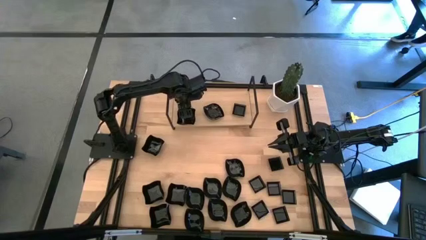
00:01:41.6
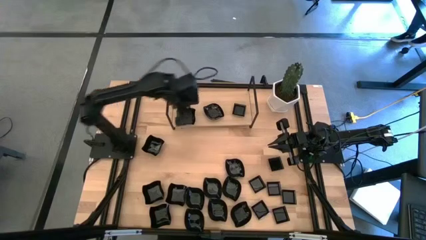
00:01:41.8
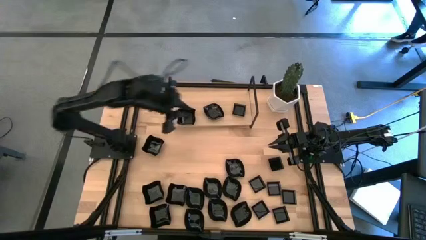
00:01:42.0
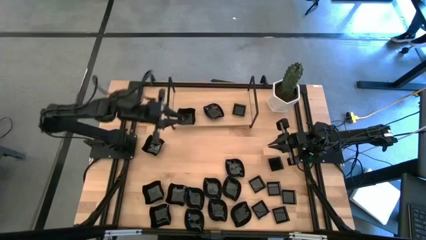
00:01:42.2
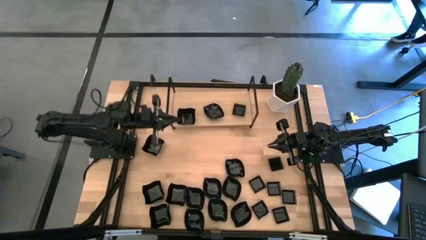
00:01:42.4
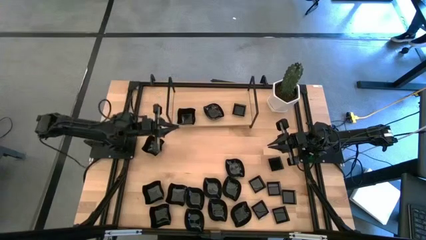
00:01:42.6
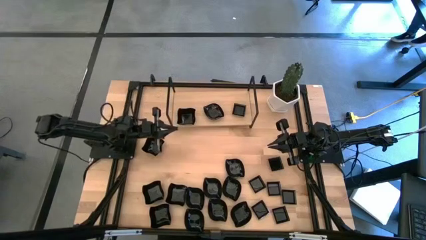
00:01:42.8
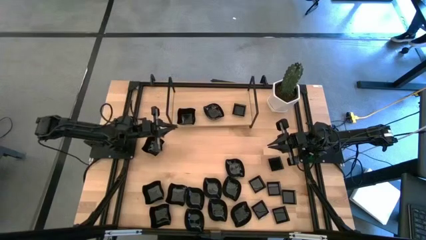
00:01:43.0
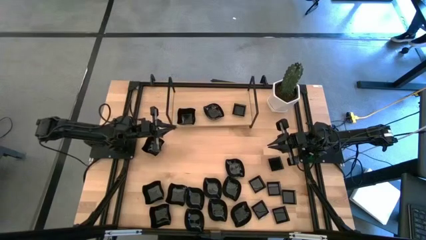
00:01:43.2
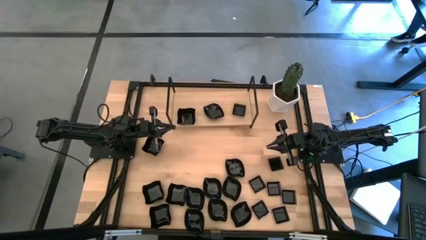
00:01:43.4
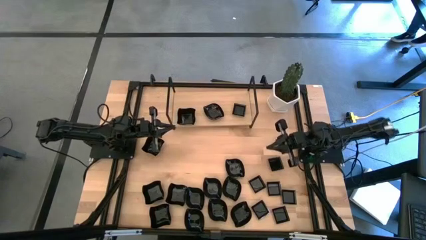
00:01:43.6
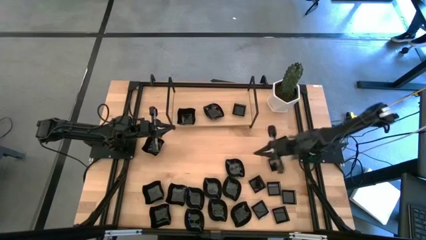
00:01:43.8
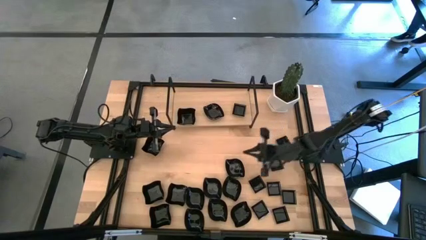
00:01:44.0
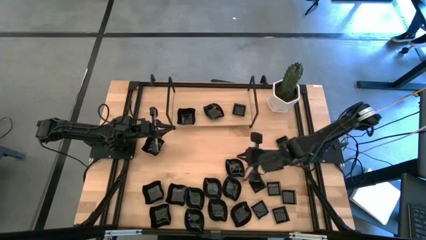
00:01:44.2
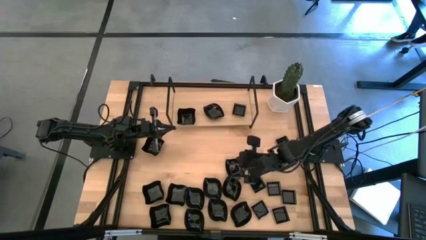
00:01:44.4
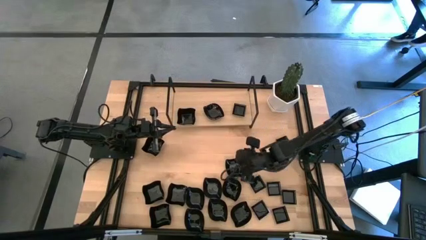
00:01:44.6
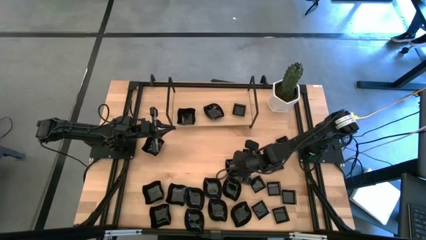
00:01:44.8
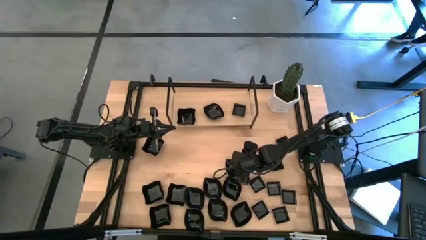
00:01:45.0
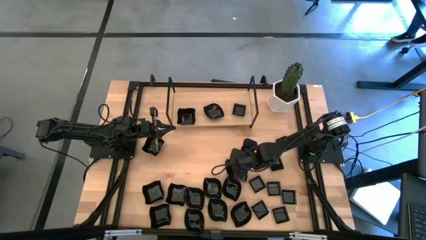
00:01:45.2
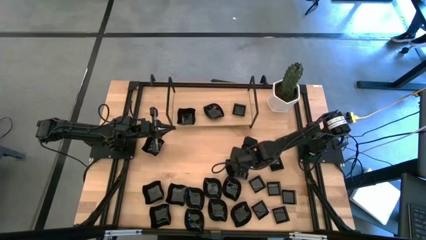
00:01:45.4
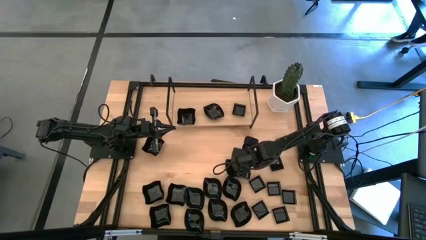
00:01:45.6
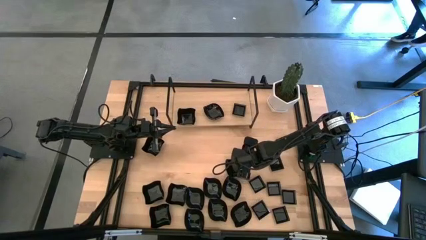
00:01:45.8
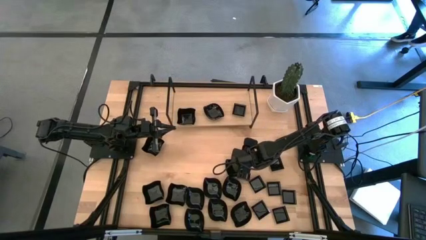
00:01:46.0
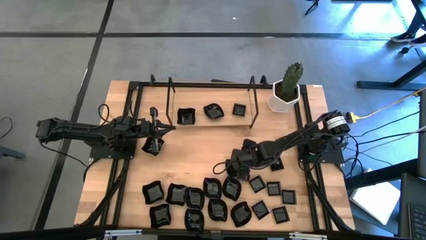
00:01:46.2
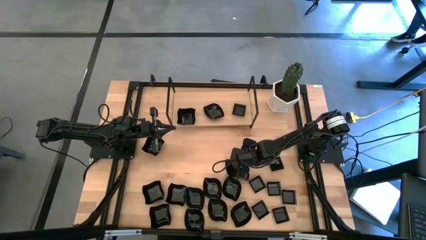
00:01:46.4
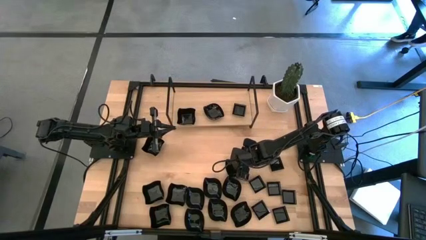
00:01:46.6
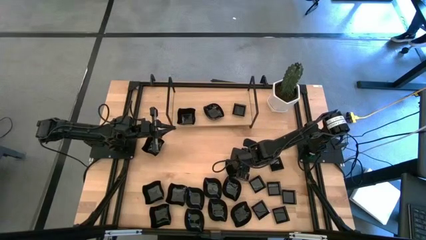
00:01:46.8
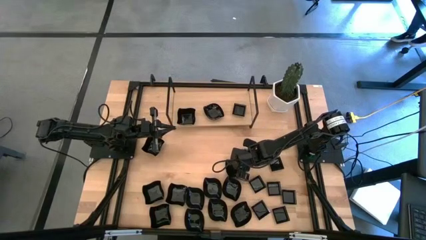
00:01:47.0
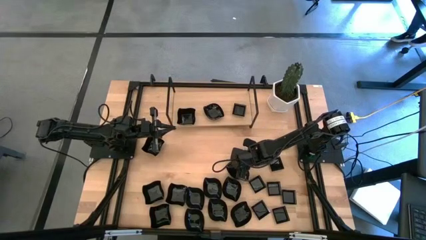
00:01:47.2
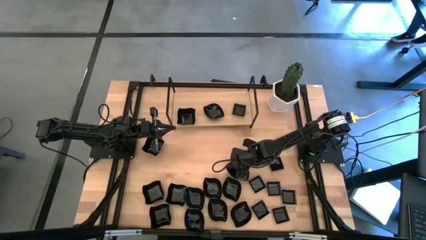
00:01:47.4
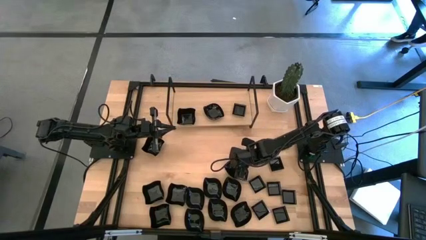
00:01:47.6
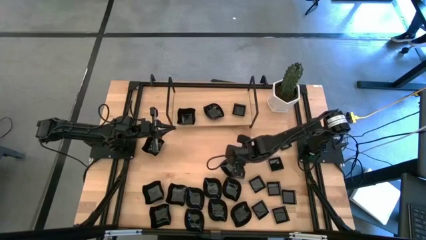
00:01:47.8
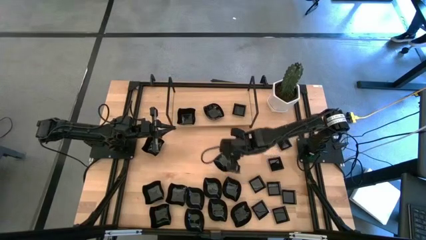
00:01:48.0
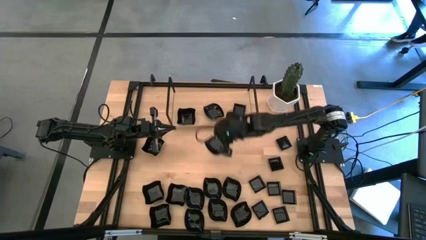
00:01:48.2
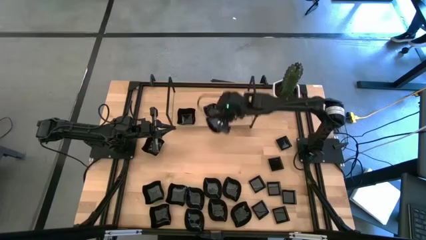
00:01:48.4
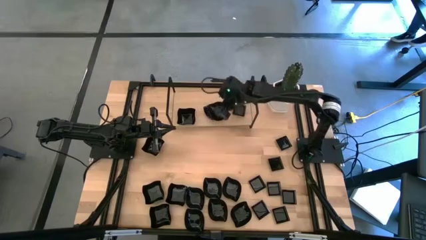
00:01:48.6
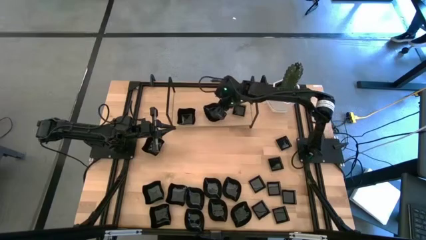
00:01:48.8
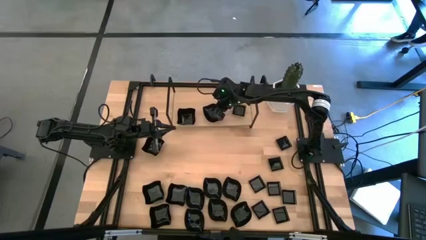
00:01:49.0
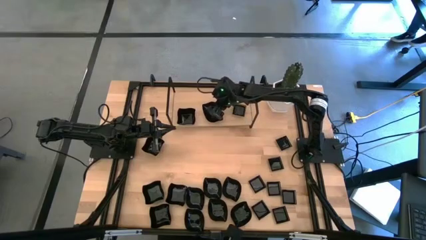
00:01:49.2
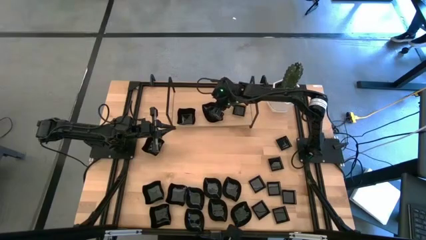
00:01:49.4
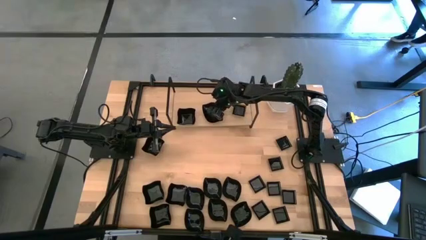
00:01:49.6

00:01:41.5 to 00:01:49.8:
Task: Pick & Place Mini shaped plates
Stack the black leaf-shaped plate on top of the black leaf-shaped plate on the shelf

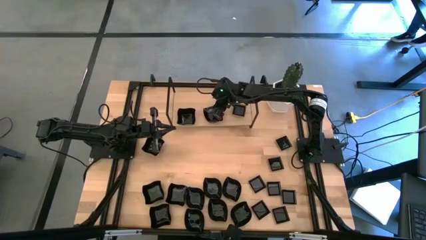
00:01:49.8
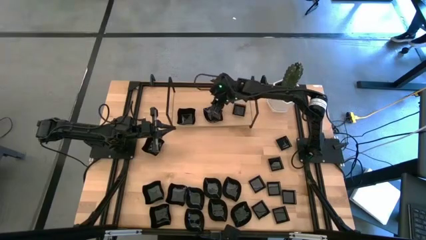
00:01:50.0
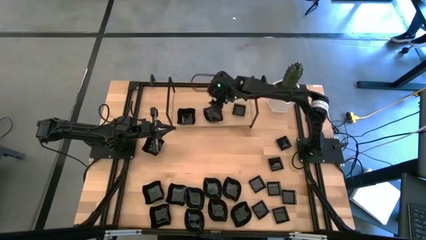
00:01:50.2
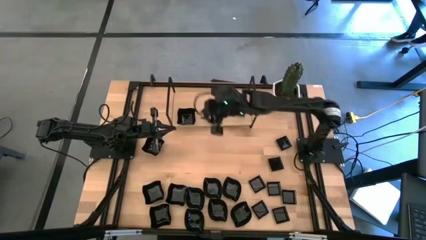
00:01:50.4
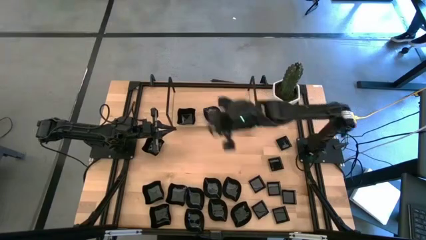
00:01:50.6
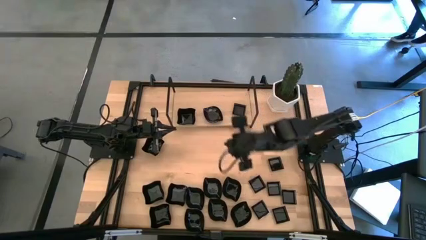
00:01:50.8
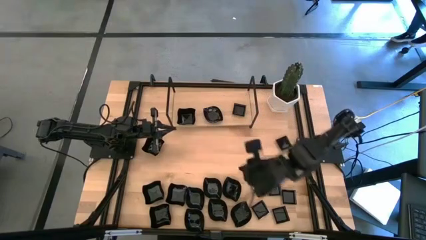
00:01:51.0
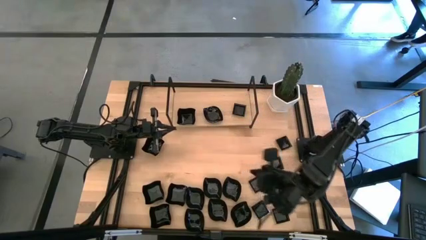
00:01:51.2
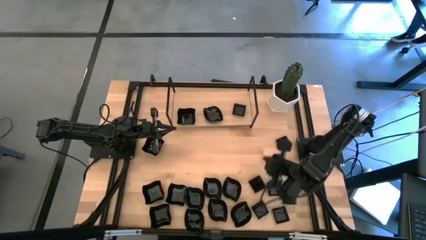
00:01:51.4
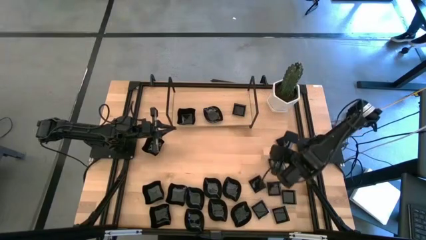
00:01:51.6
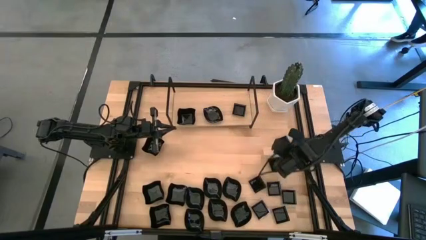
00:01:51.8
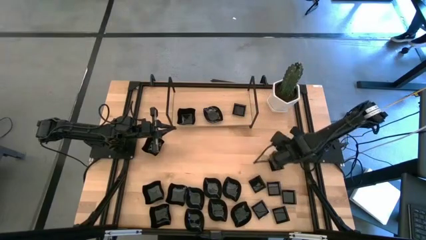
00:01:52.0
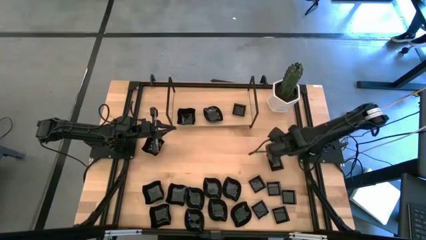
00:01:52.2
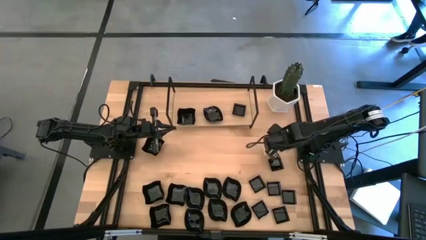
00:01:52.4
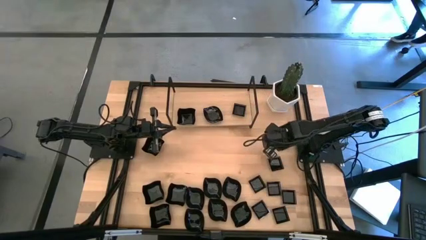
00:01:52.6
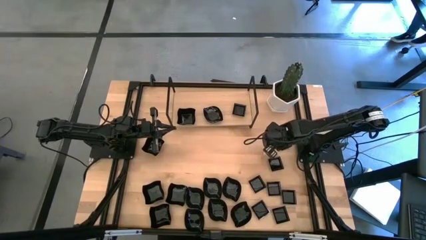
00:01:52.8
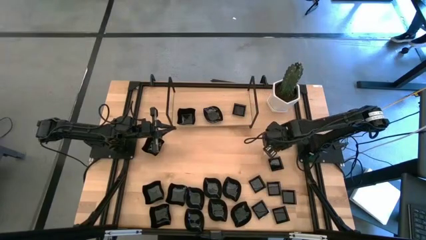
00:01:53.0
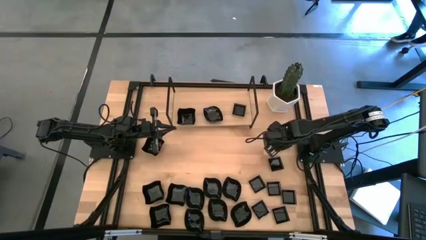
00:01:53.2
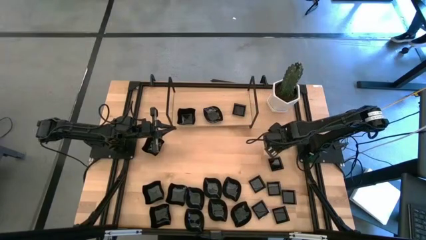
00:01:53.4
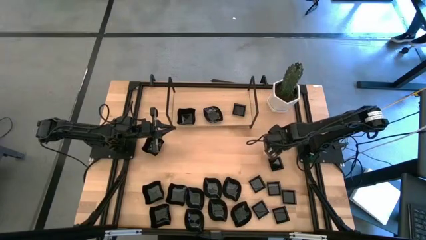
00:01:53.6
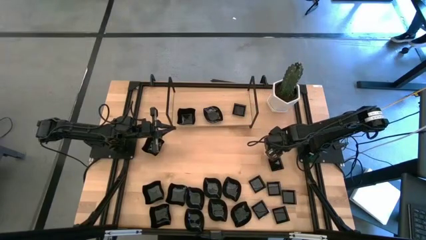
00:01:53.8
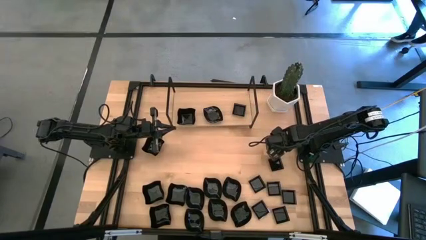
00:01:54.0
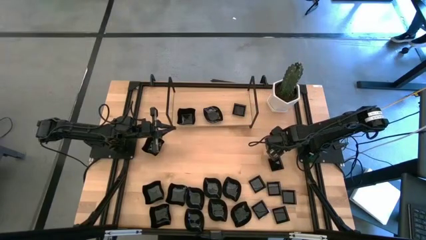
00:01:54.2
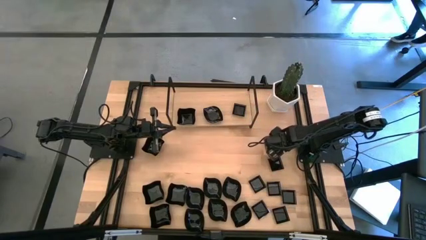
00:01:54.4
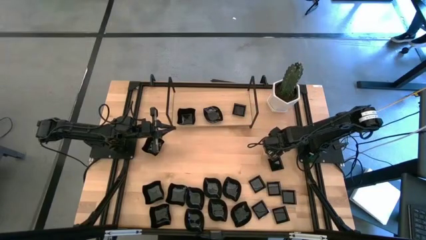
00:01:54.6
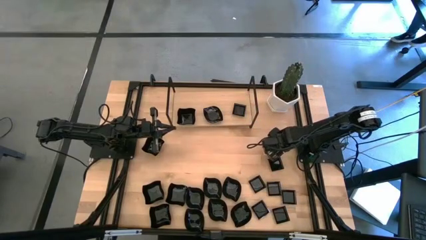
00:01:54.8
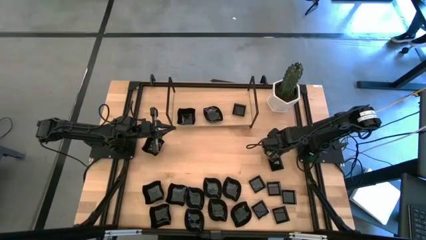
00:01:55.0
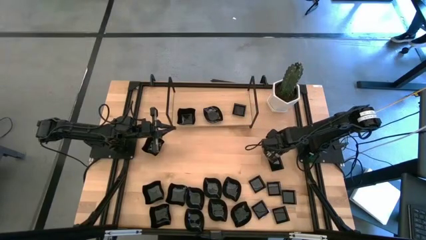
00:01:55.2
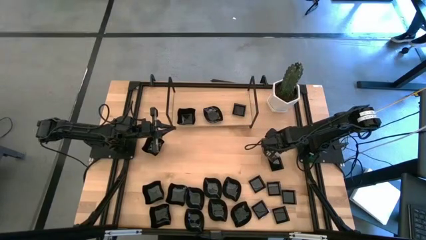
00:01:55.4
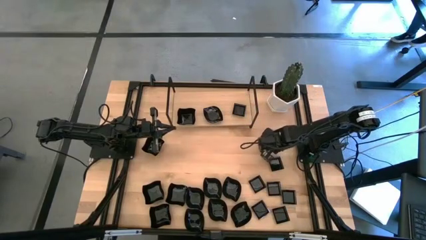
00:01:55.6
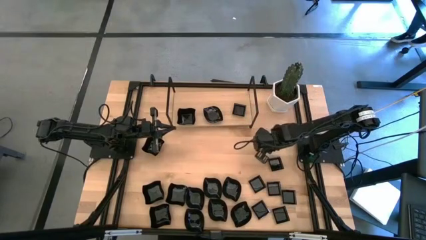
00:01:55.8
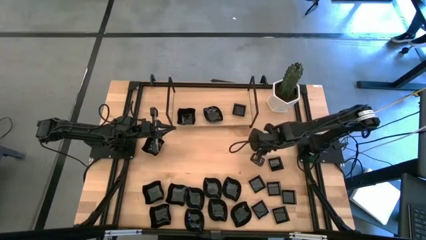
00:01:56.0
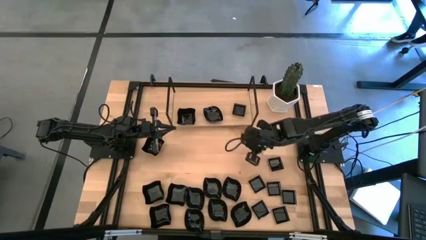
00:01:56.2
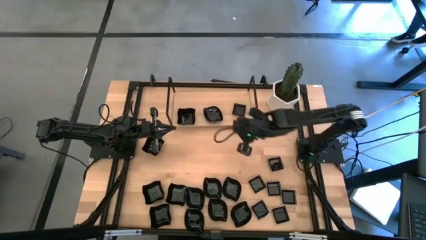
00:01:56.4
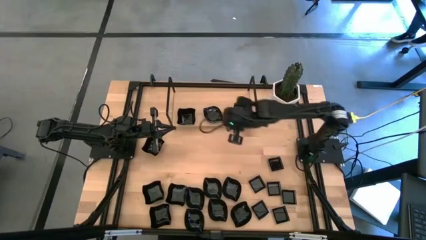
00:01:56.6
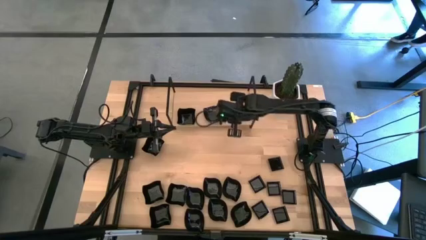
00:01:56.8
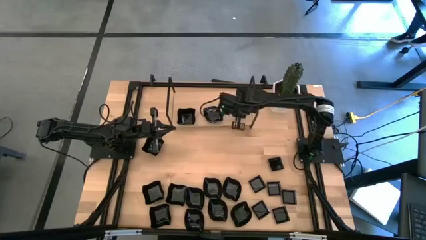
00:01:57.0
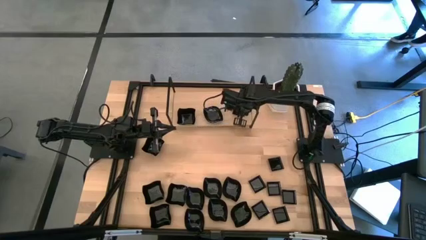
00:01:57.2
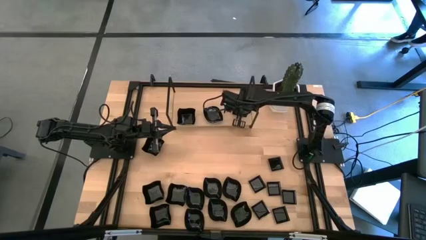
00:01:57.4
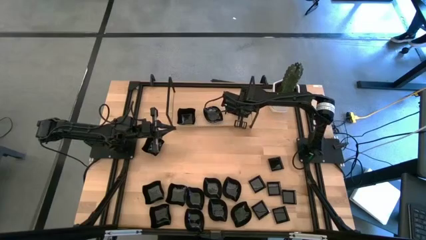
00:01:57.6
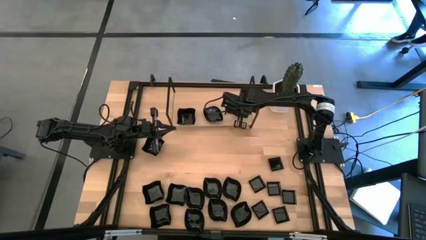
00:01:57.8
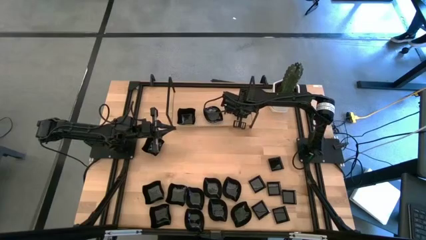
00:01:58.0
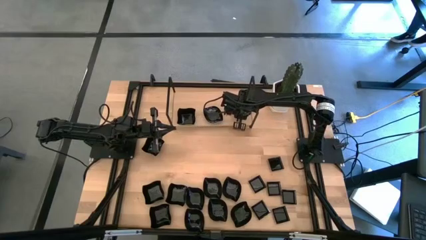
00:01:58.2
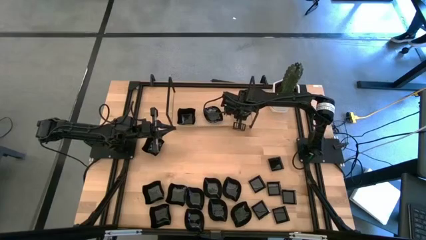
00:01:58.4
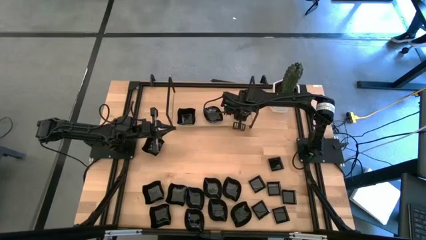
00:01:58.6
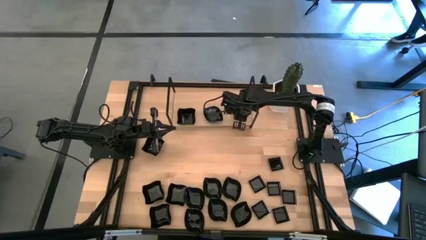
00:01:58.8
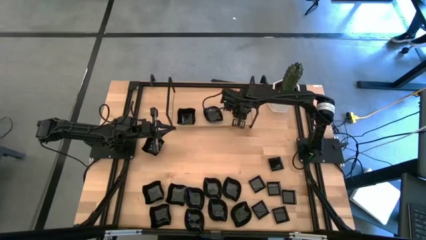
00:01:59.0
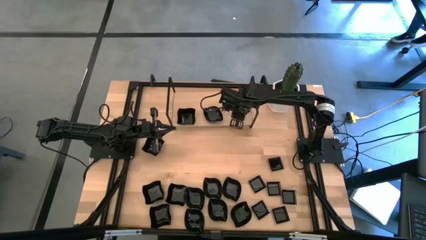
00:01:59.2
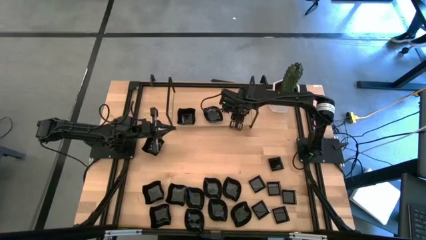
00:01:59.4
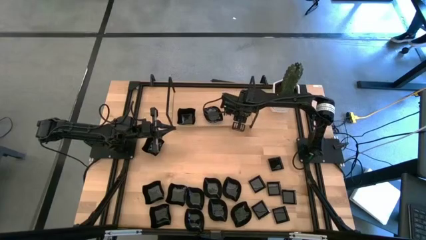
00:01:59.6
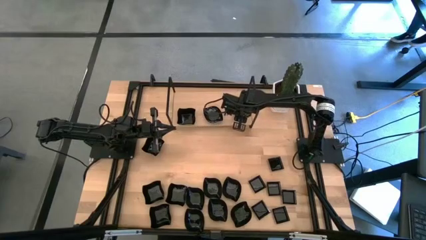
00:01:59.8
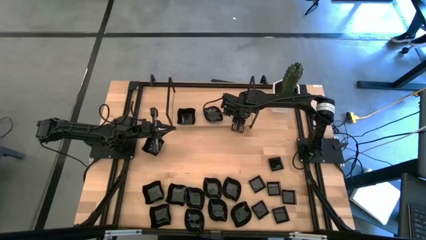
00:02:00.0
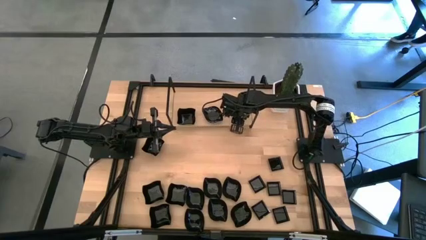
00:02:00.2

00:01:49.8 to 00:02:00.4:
Stack the black square plate on top of the black square plate on the shelf
